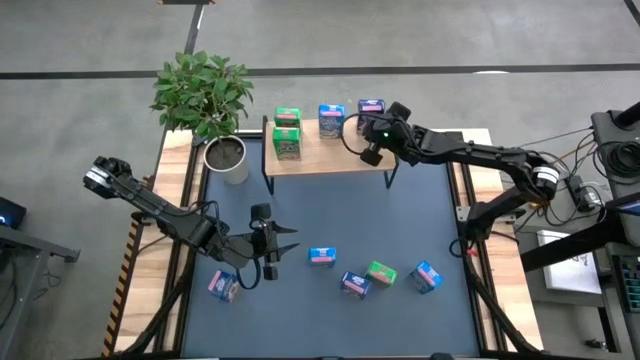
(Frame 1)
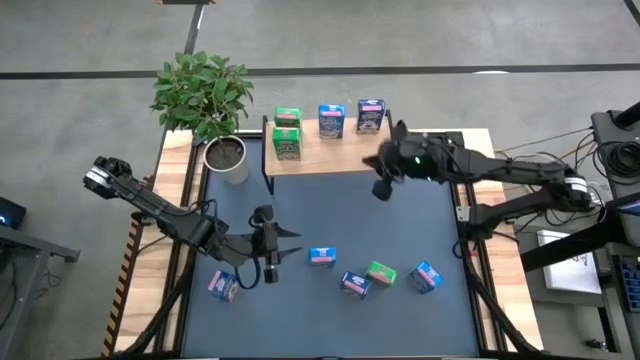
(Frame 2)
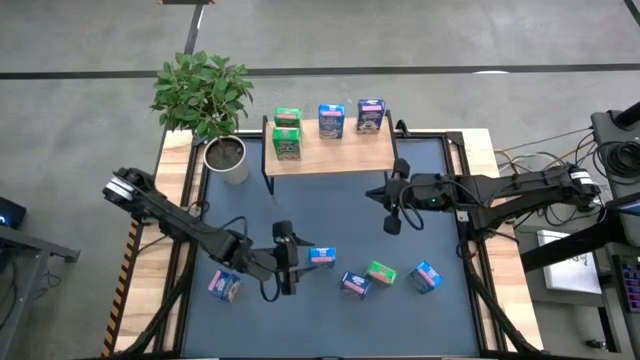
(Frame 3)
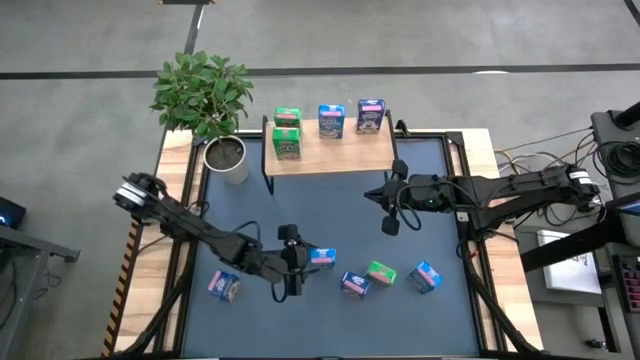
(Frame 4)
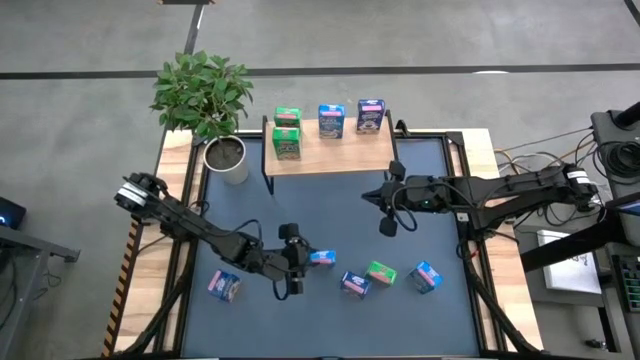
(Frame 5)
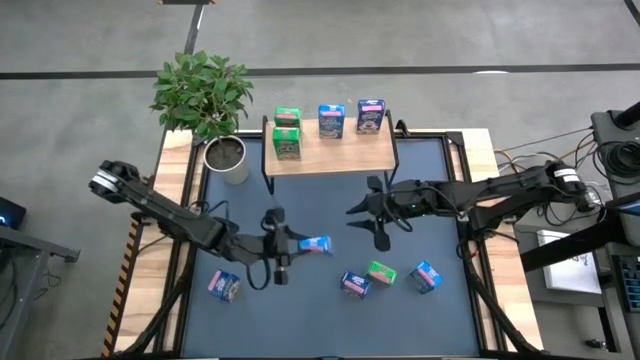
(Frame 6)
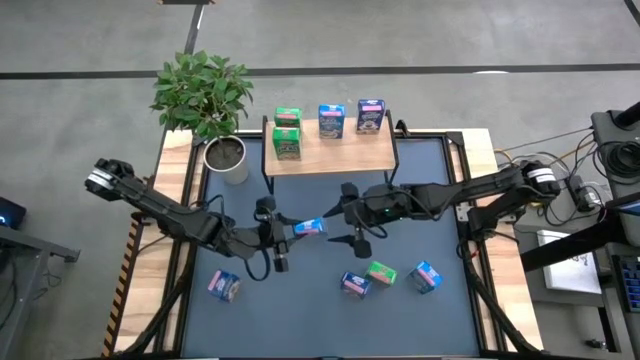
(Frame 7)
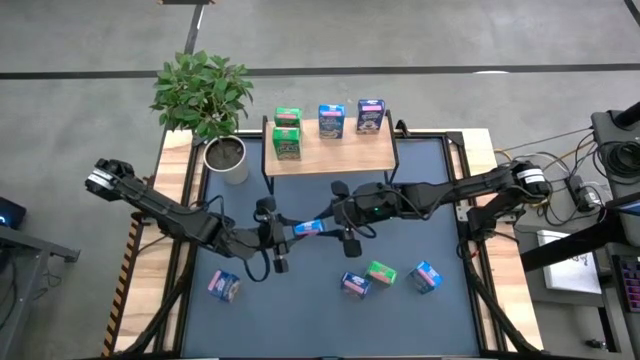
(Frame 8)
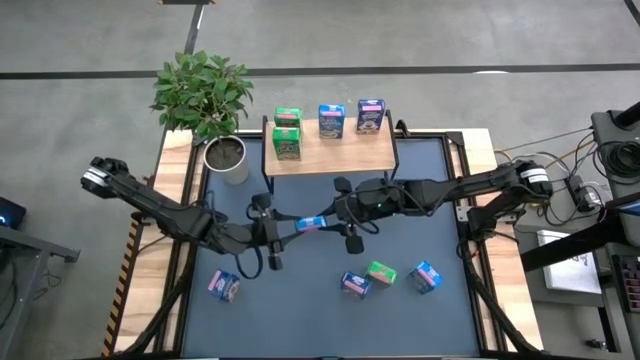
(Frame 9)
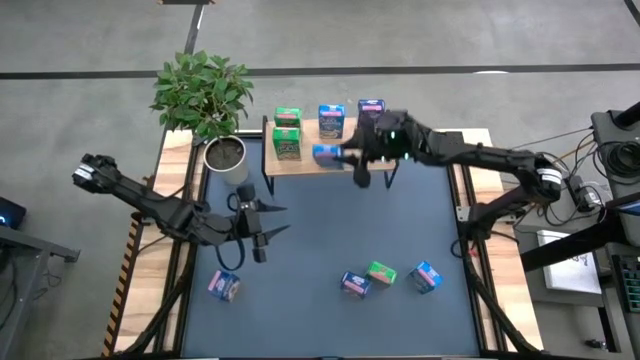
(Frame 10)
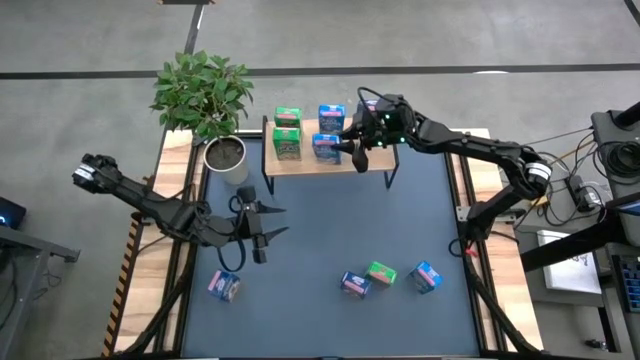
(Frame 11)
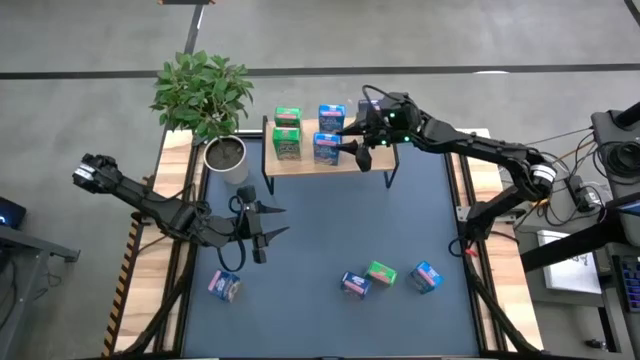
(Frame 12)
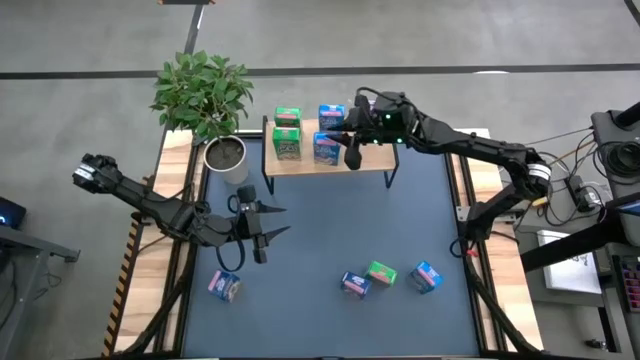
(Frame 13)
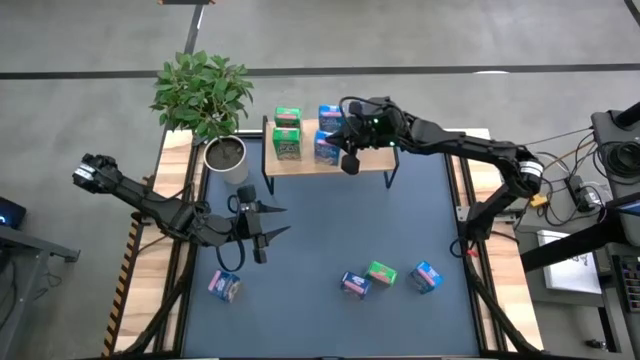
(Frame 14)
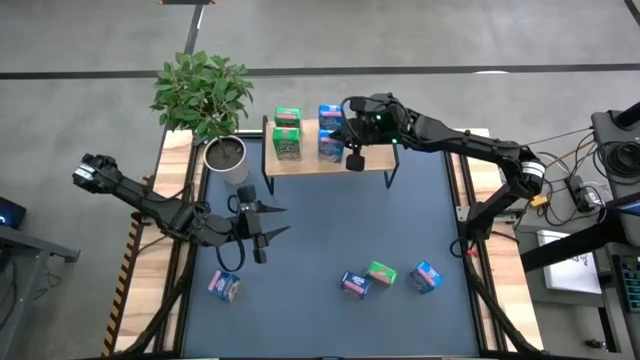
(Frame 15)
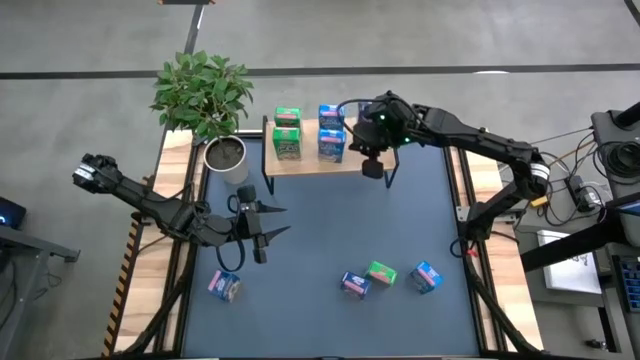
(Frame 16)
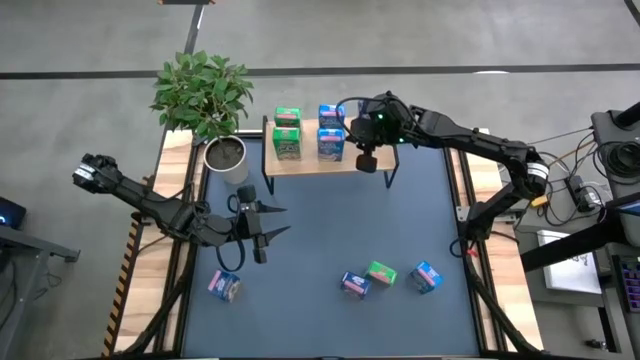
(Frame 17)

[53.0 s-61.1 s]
Task: Stack cereal on shelf
Put the left light blue cereal box on the shelf

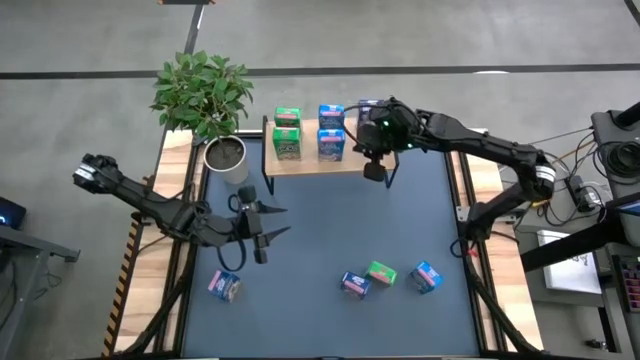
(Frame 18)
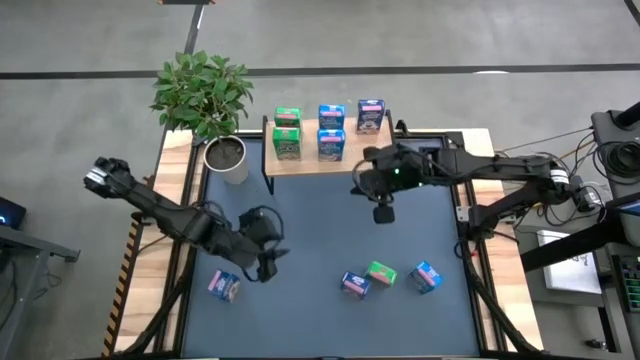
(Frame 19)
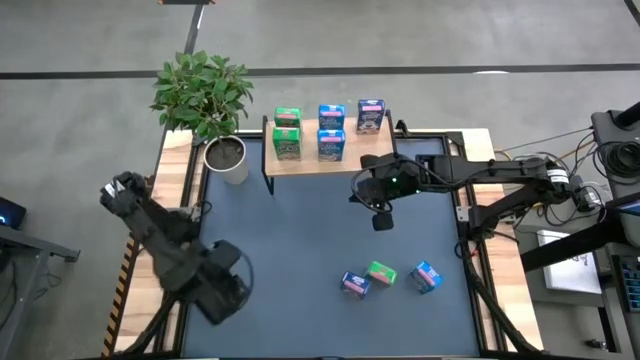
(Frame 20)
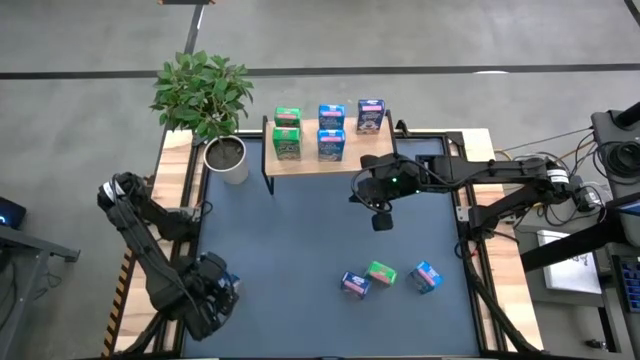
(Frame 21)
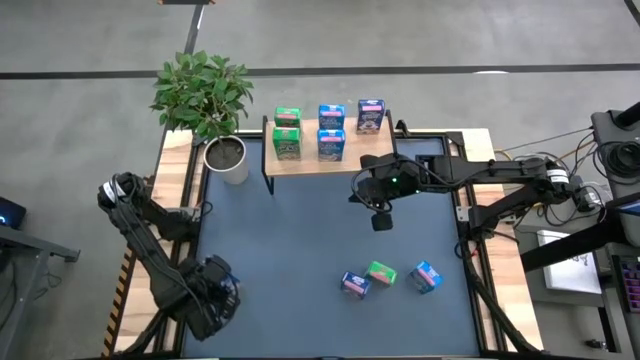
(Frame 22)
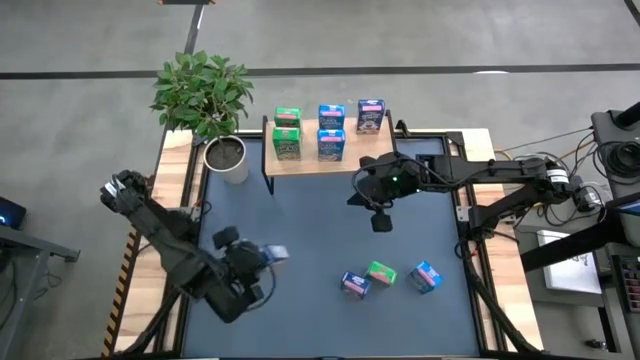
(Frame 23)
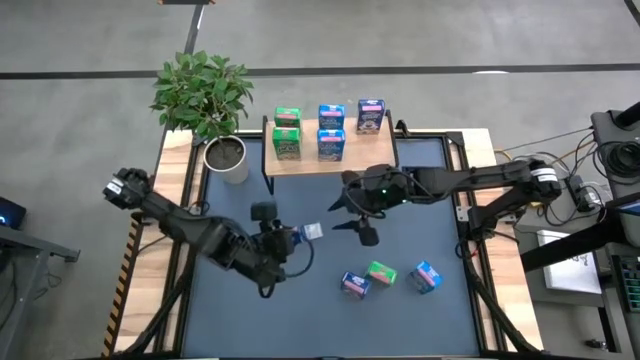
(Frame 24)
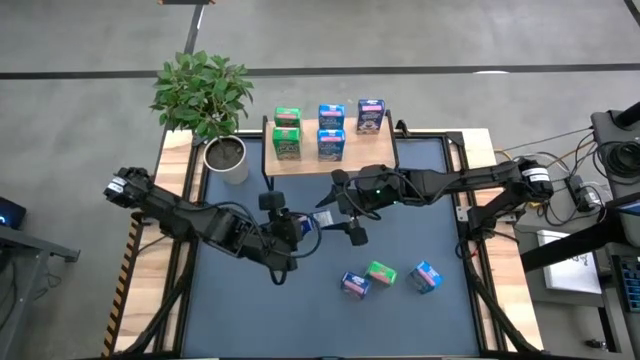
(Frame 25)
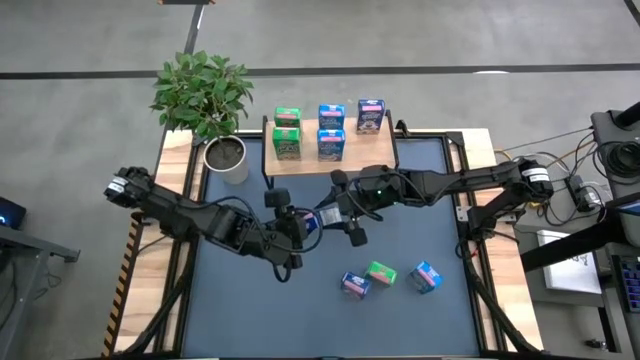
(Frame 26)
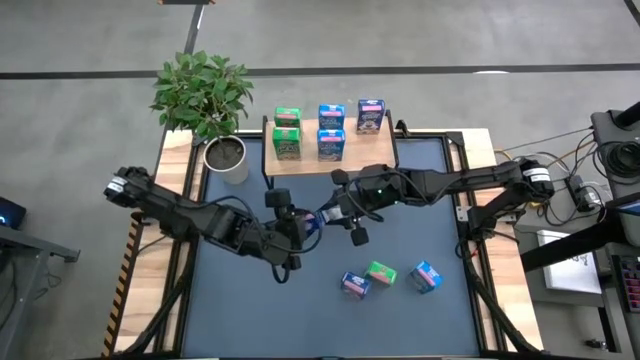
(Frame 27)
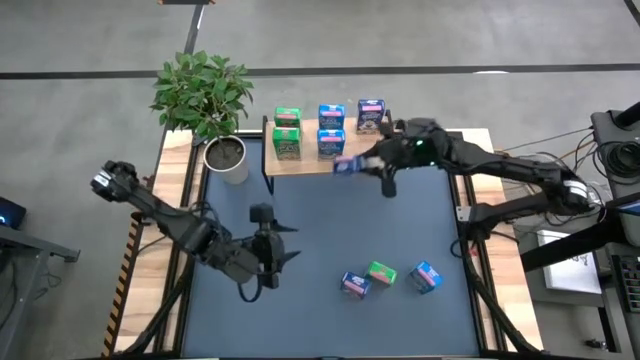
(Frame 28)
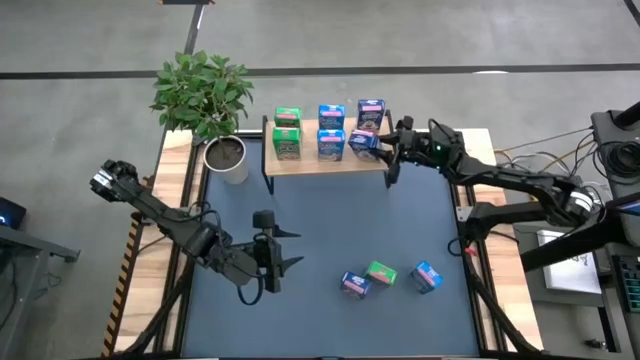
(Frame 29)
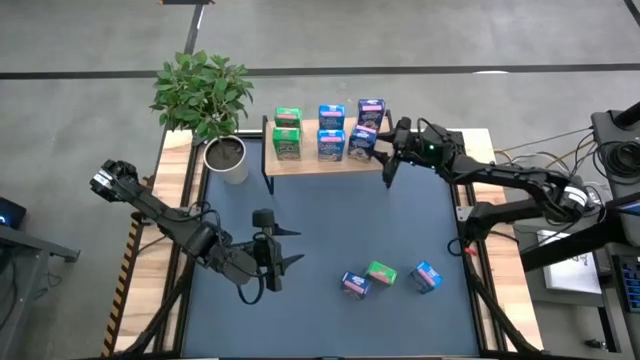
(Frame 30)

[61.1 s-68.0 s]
Put the left blue cereal box on the shelf

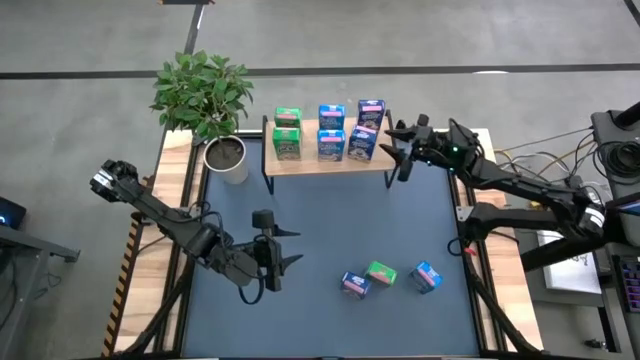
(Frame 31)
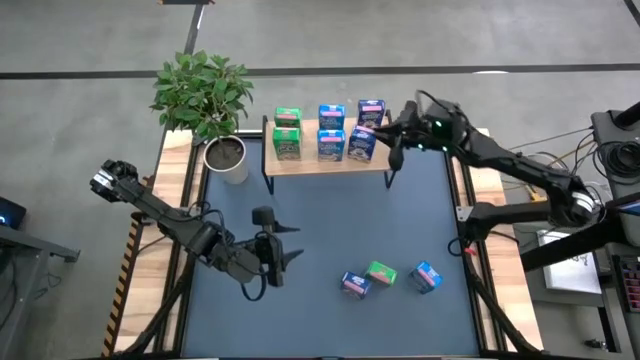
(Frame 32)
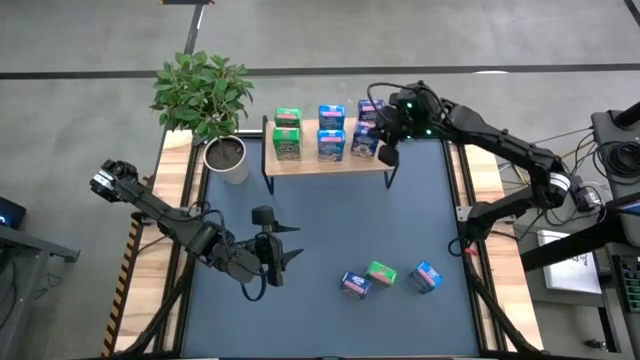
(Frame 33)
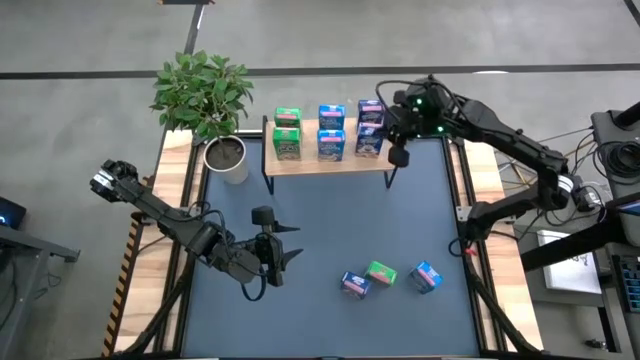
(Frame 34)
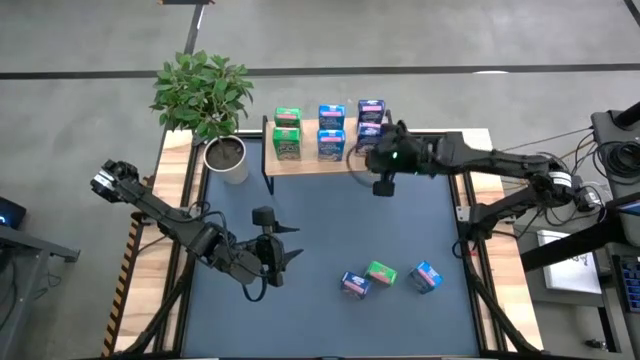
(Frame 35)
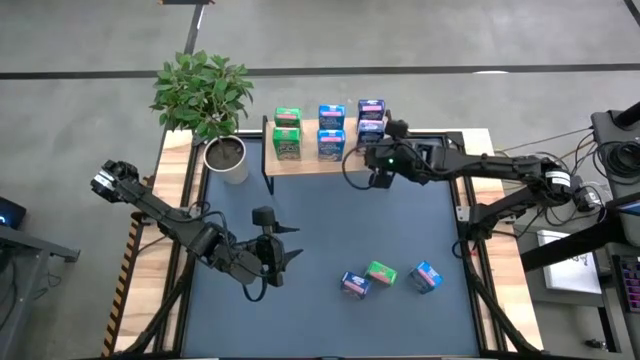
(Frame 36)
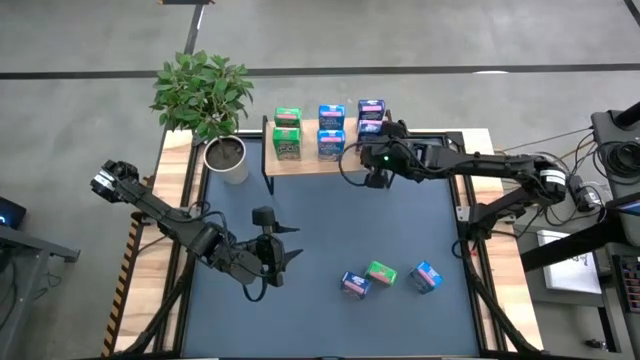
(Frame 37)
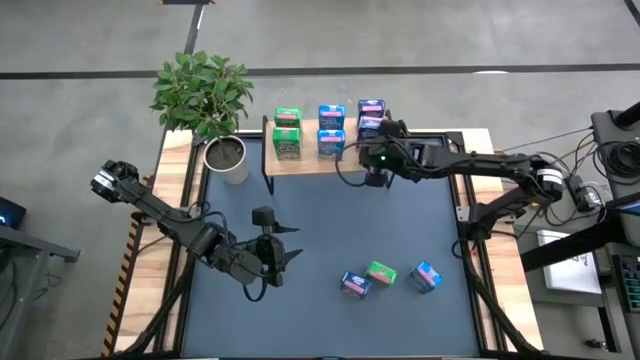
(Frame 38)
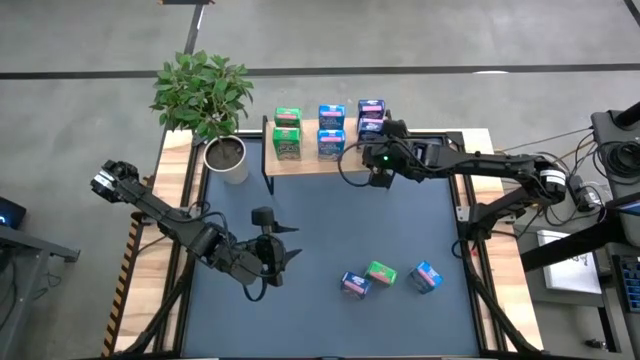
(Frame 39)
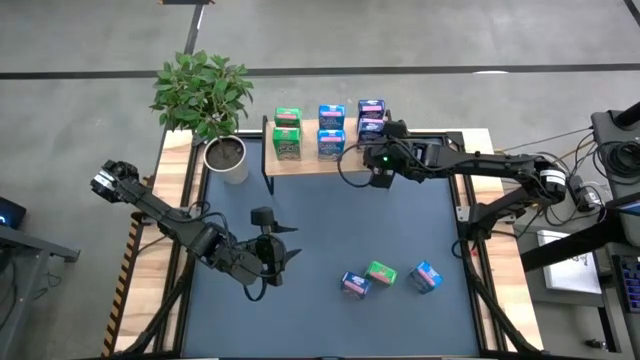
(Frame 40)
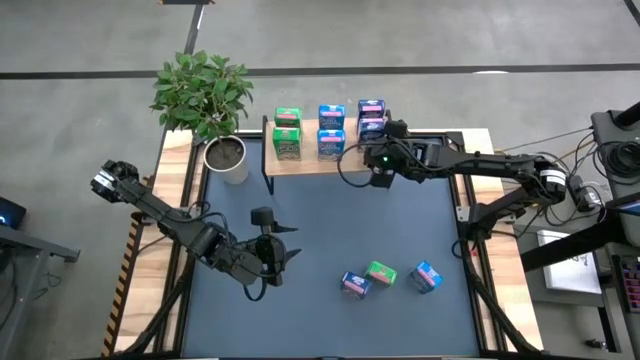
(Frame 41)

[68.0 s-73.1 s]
Adjust the blue cereal box on the shelf

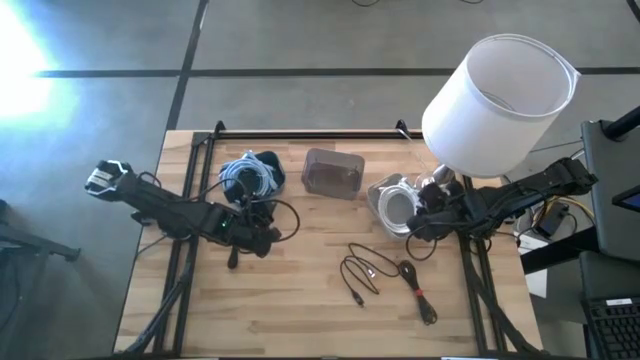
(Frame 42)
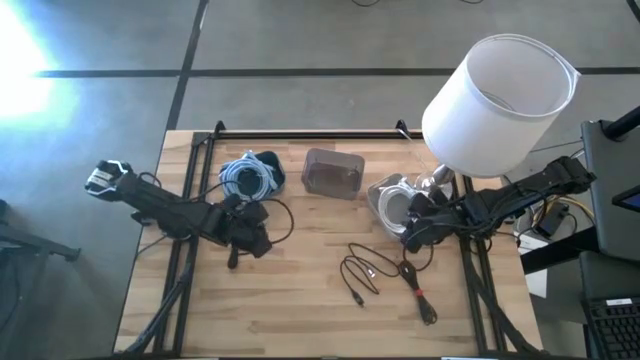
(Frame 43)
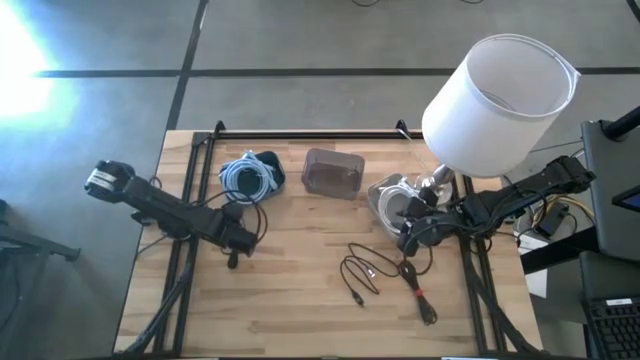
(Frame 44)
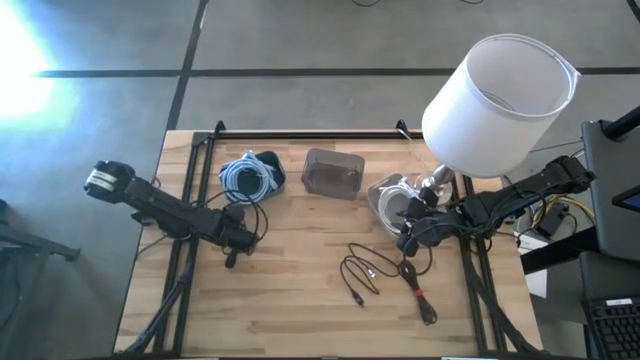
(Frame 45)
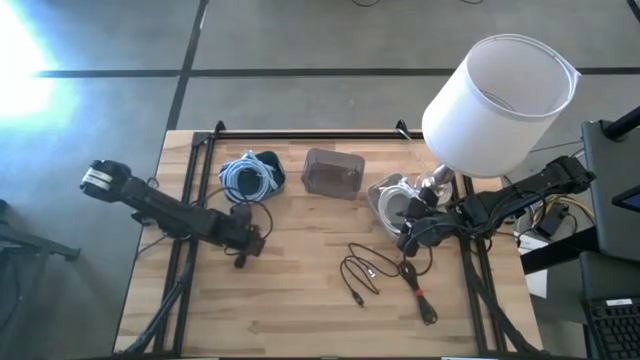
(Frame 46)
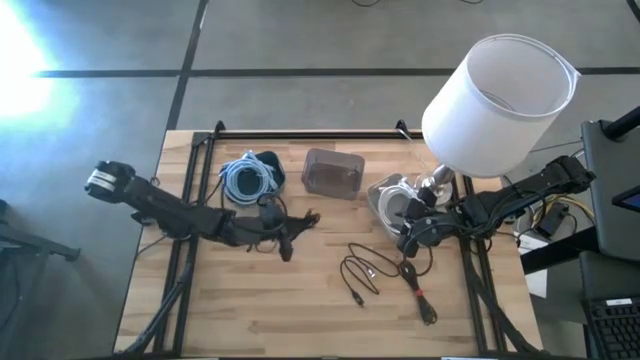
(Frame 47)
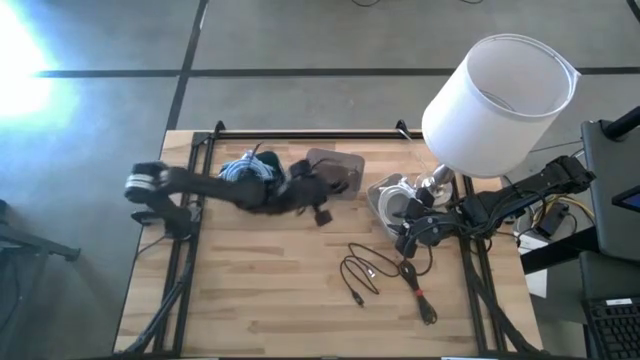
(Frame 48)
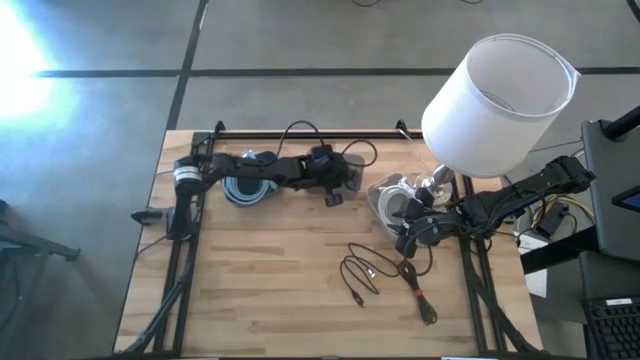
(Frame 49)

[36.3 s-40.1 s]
Task: Pick & Place USB Port
Put the top left black charger cable into the black bin
